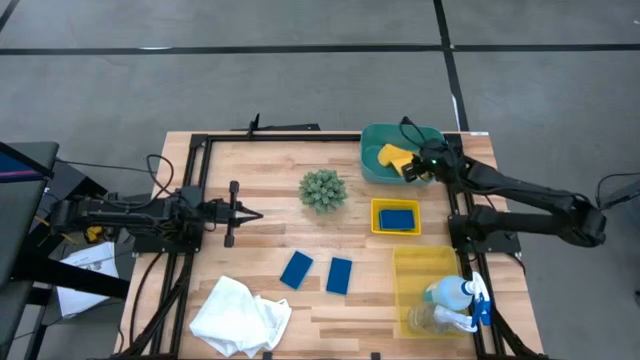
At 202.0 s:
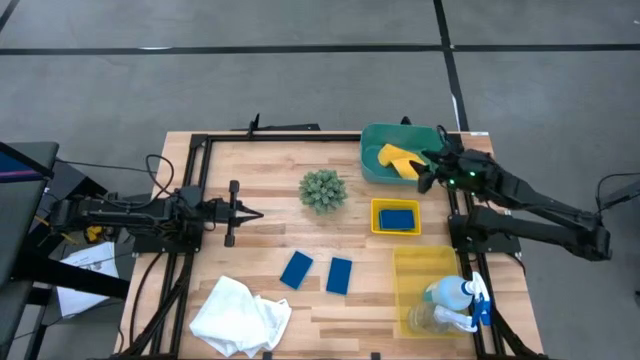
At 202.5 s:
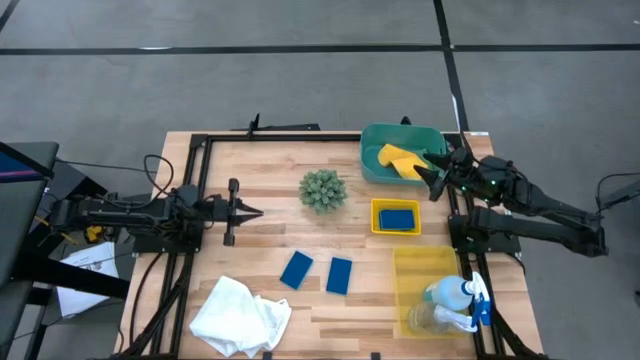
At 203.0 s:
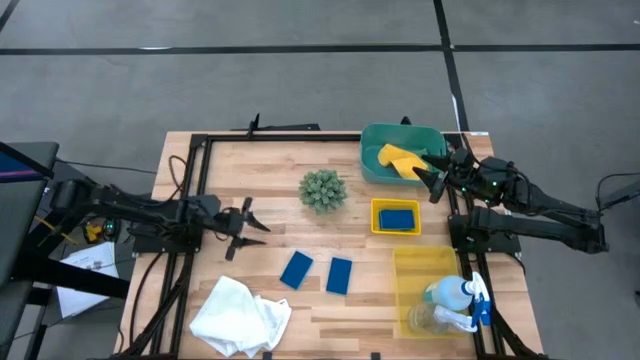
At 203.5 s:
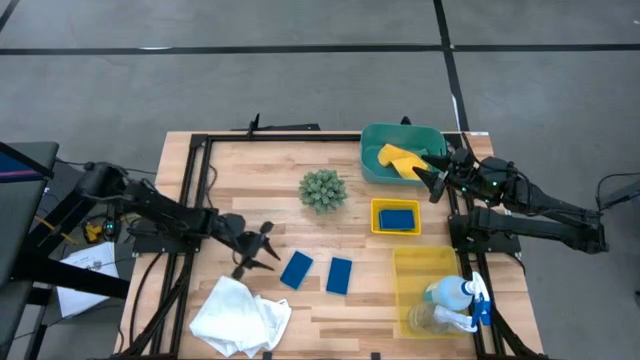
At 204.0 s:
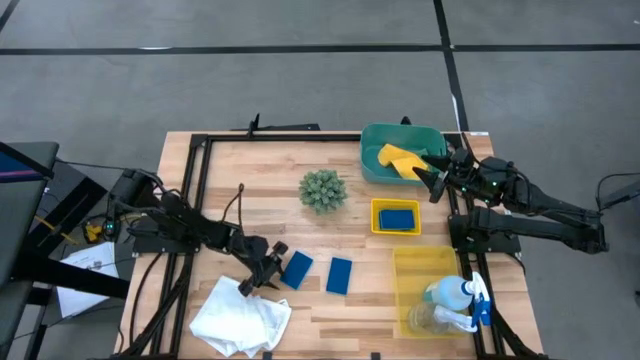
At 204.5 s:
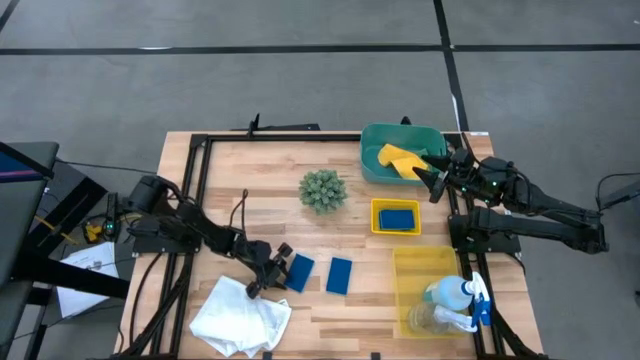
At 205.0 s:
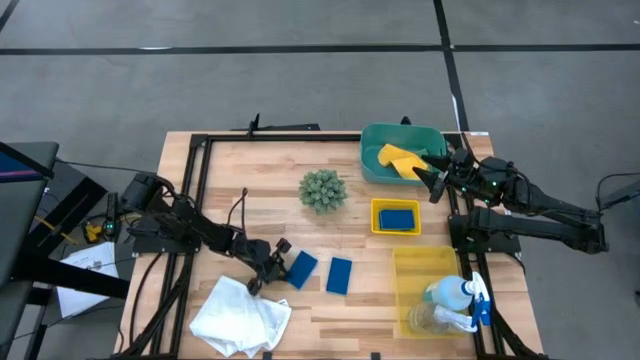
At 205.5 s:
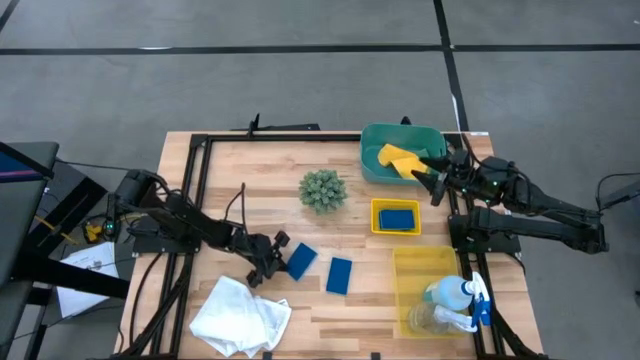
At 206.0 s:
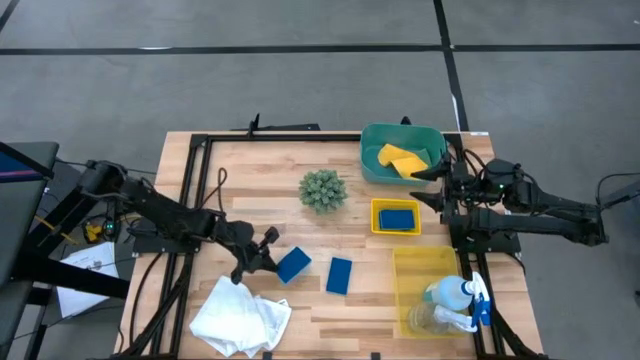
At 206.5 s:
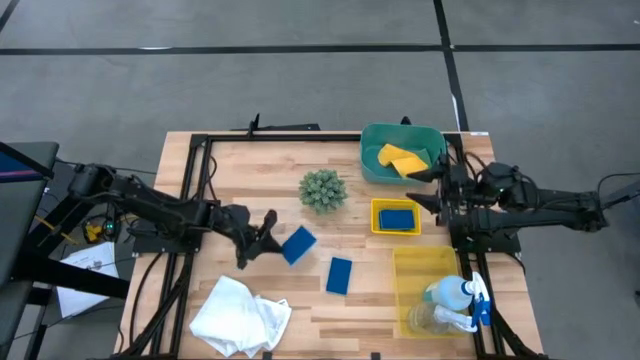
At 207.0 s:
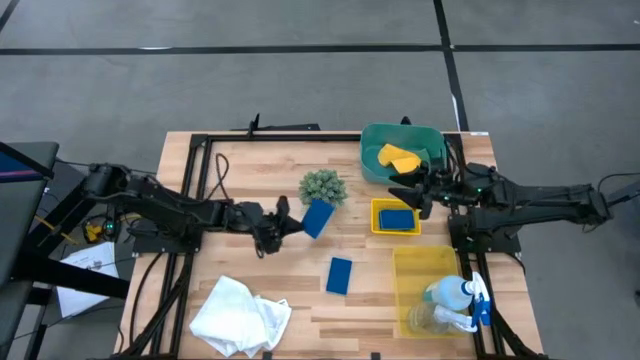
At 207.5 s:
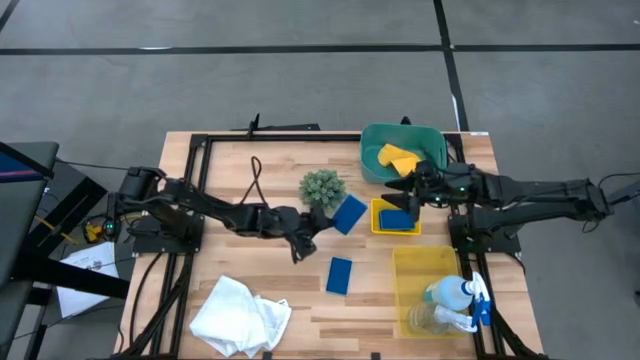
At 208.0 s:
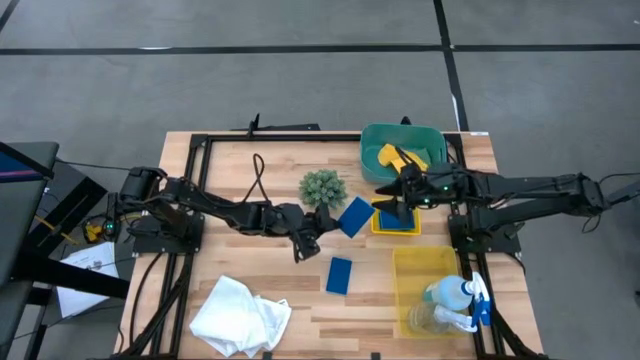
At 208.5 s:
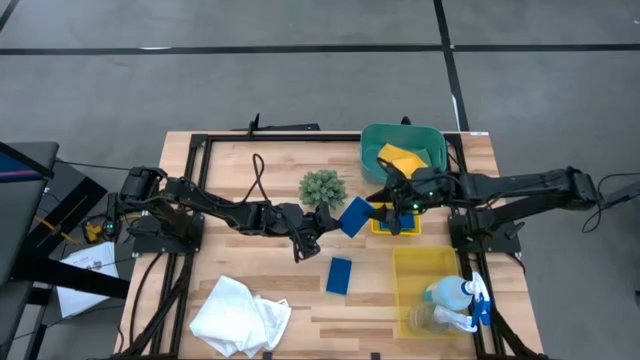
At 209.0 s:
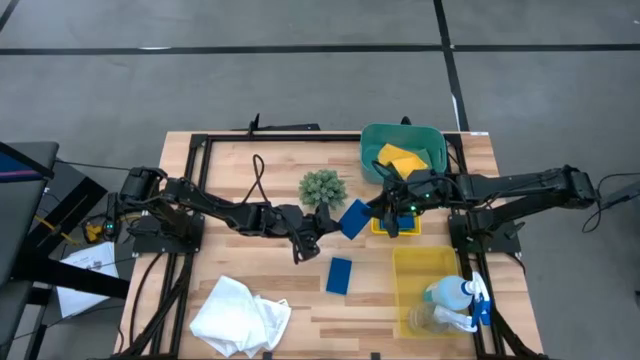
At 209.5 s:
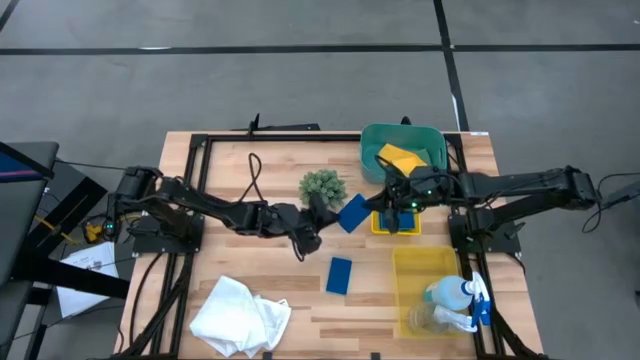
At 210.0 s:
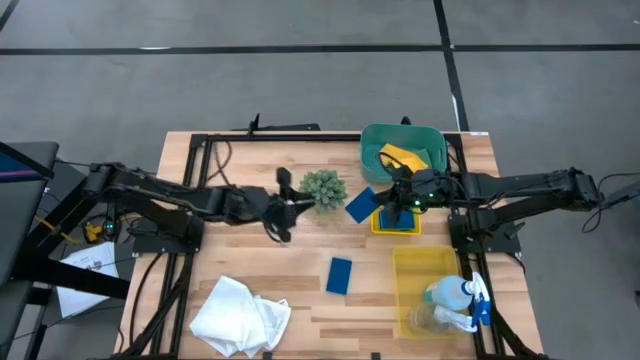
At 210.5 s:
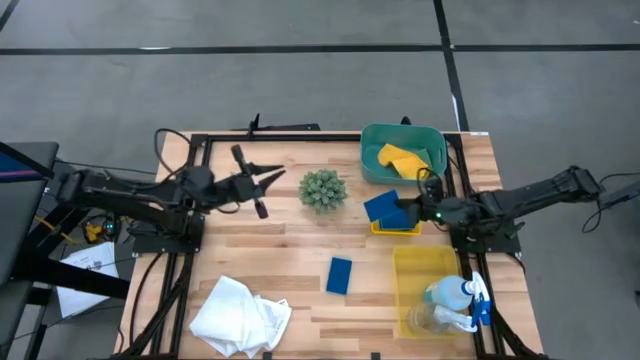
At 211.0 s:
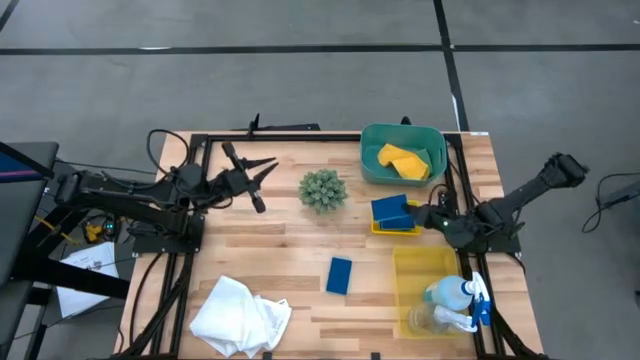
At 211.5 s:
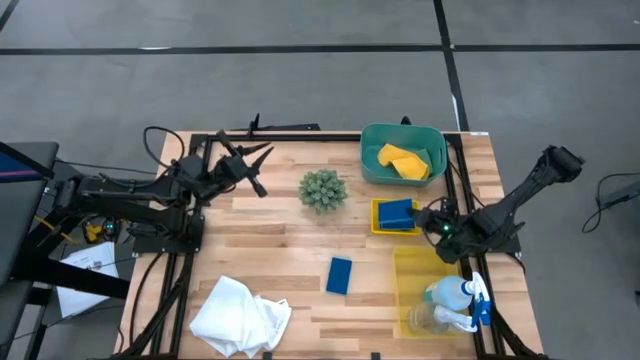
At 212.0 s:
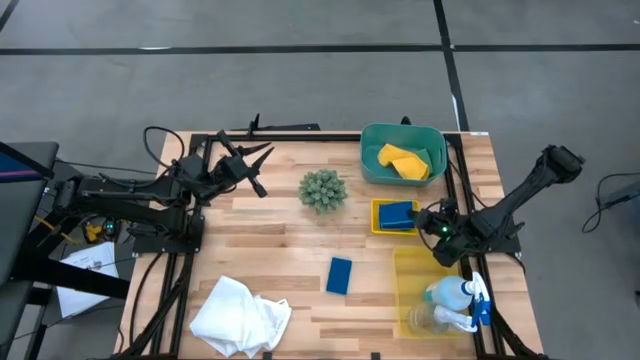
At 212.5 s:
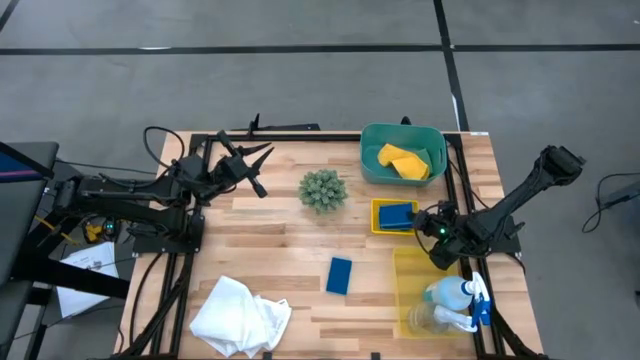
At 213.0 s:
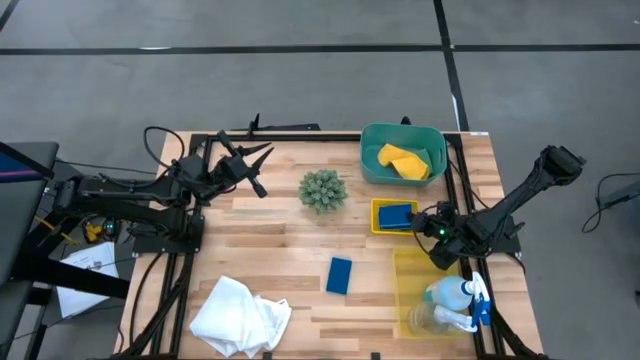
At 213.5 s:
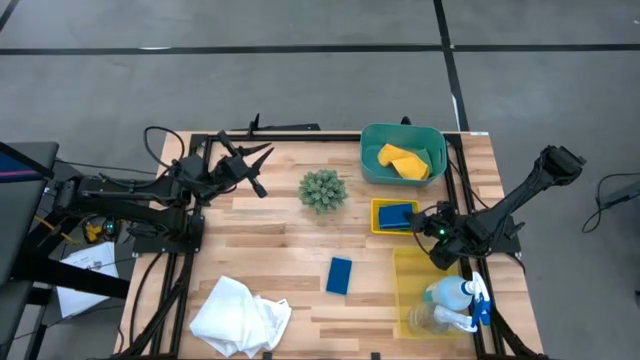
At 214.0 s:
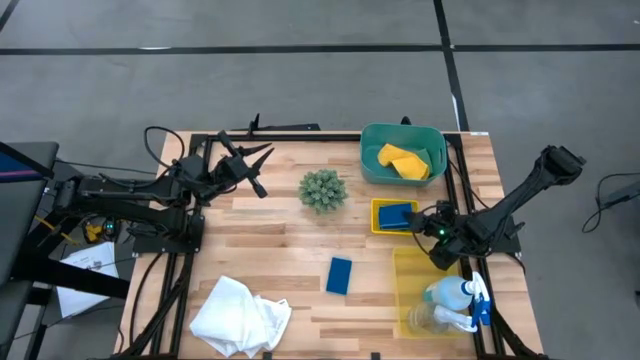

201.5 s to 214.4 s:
Task: Pick & Place Kitchen Items
Put the blue sponge into the top yellow bin

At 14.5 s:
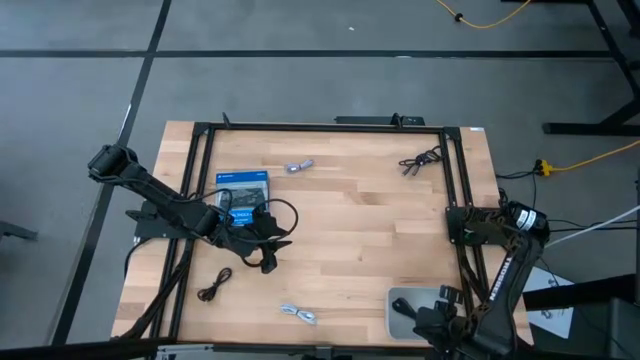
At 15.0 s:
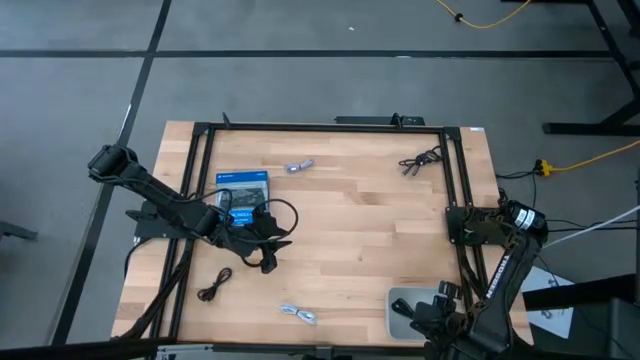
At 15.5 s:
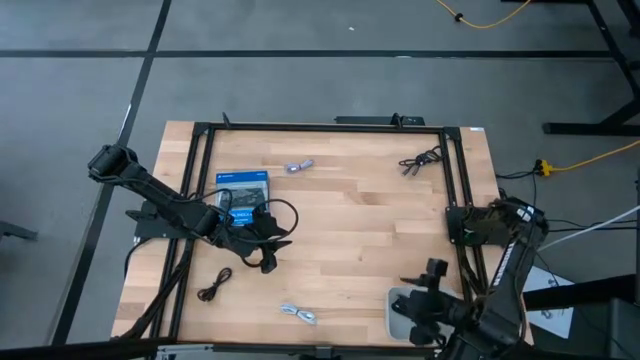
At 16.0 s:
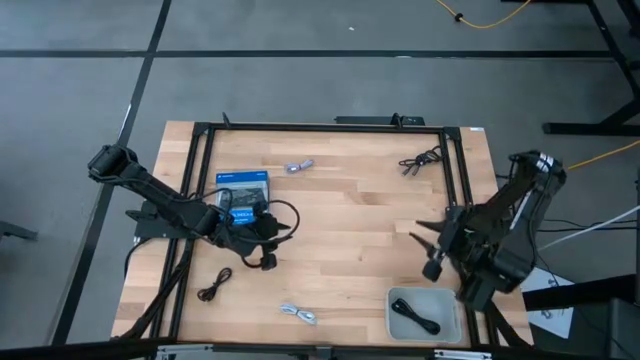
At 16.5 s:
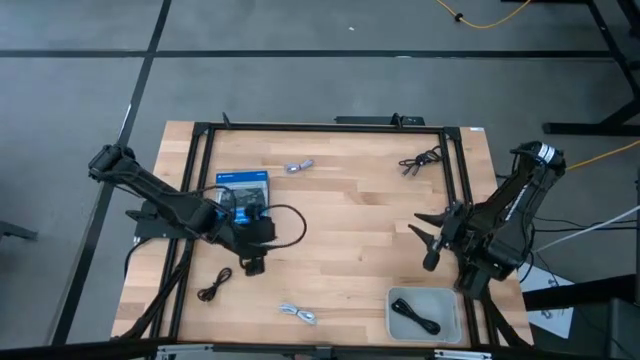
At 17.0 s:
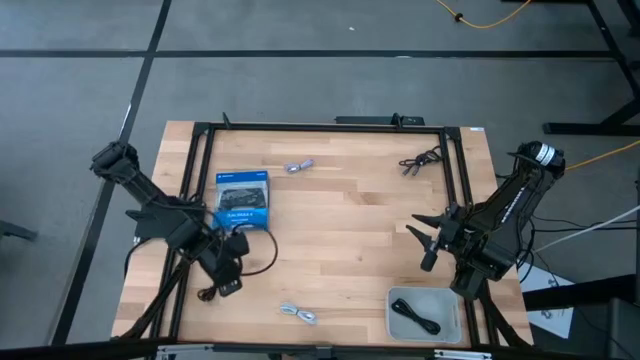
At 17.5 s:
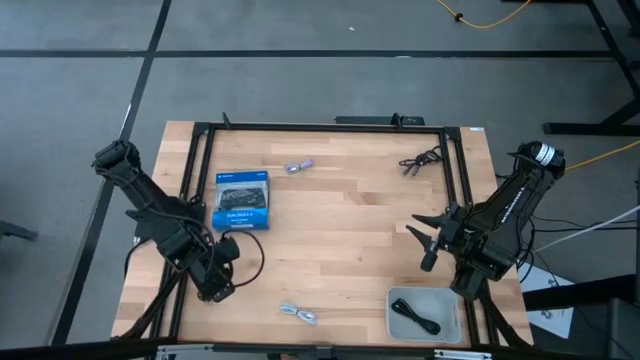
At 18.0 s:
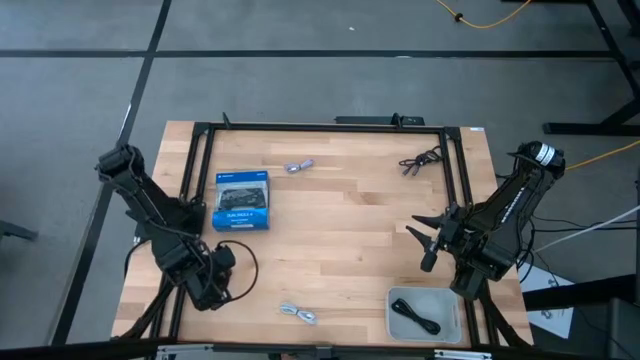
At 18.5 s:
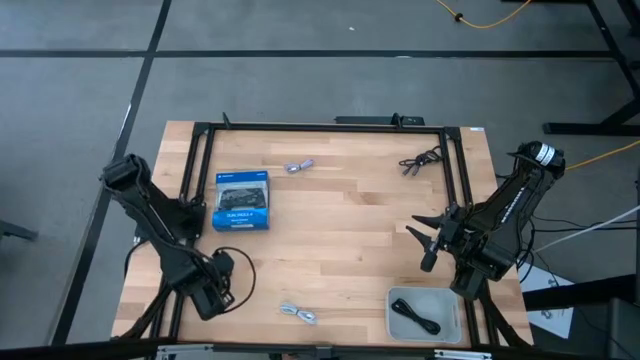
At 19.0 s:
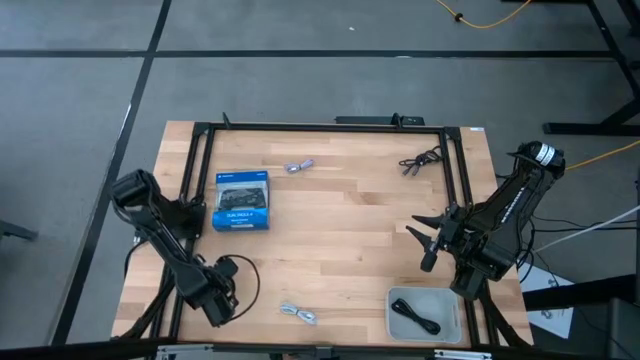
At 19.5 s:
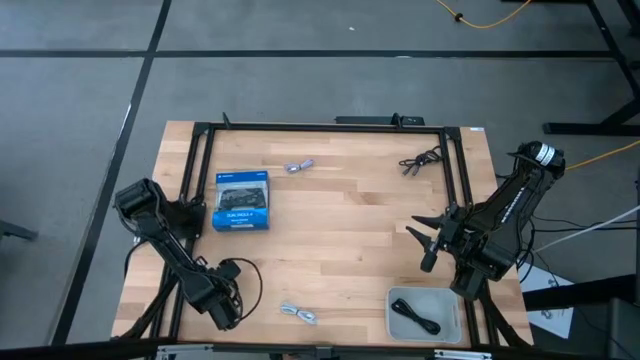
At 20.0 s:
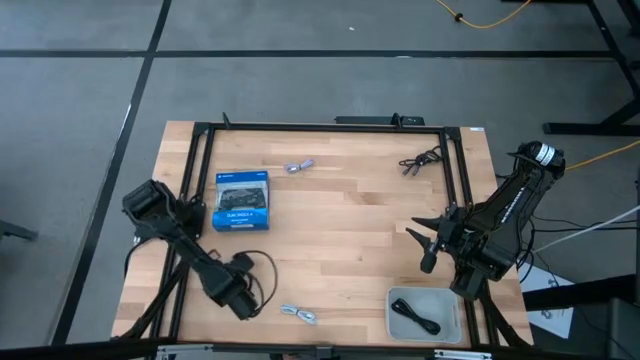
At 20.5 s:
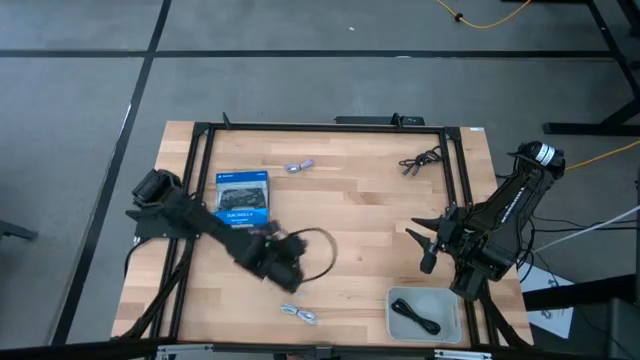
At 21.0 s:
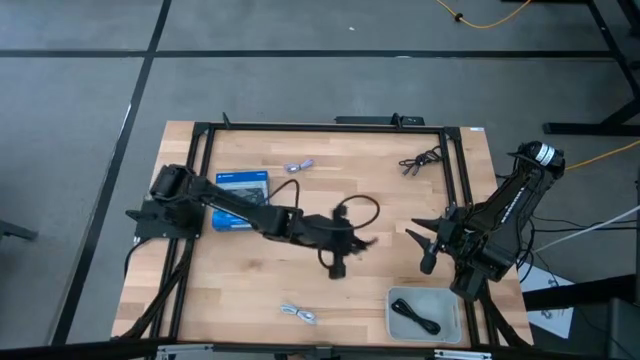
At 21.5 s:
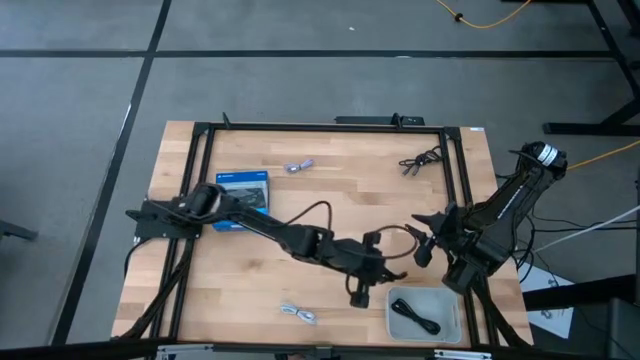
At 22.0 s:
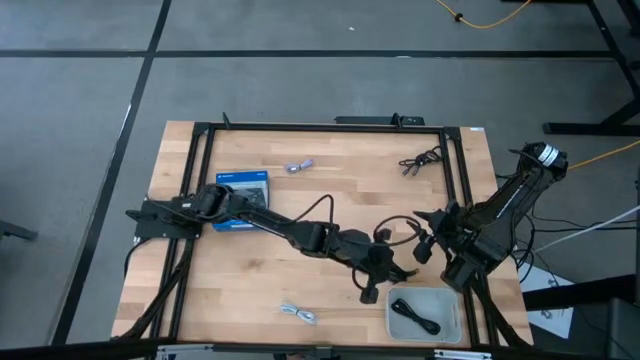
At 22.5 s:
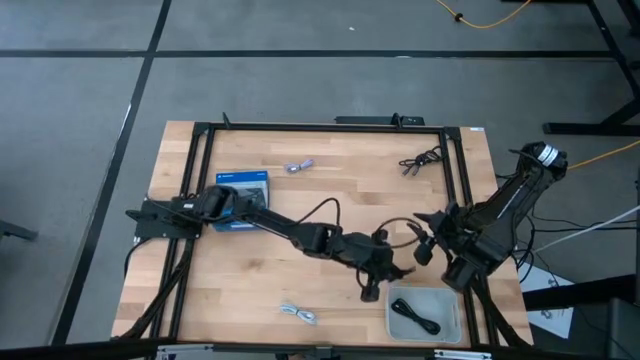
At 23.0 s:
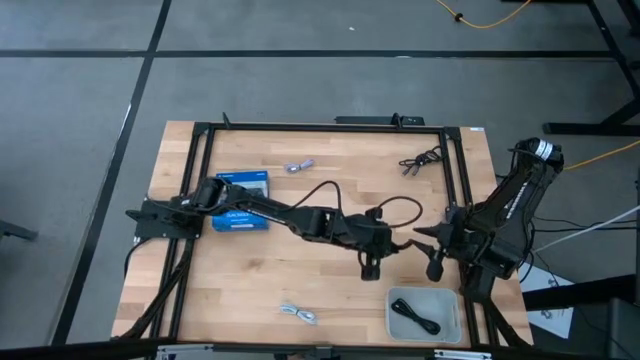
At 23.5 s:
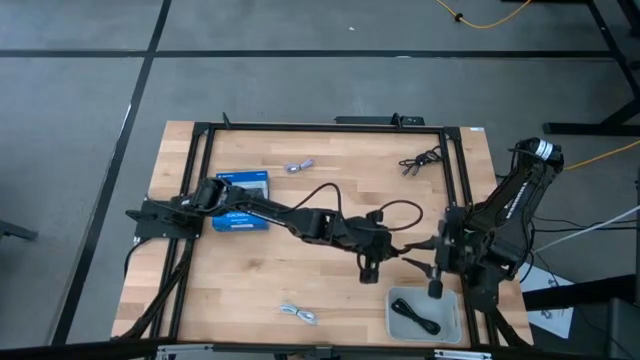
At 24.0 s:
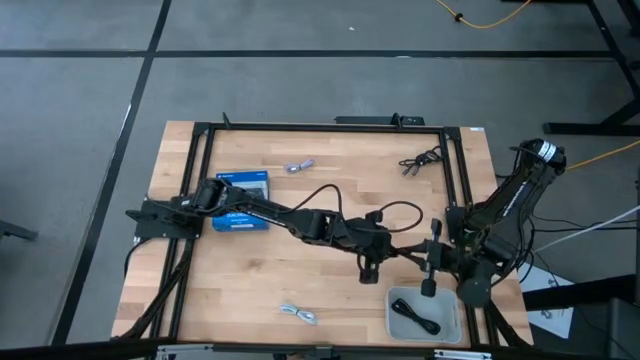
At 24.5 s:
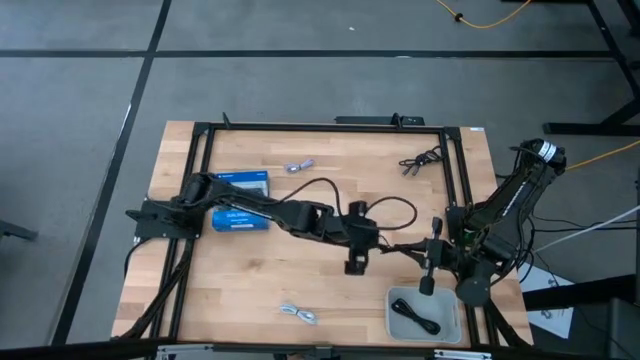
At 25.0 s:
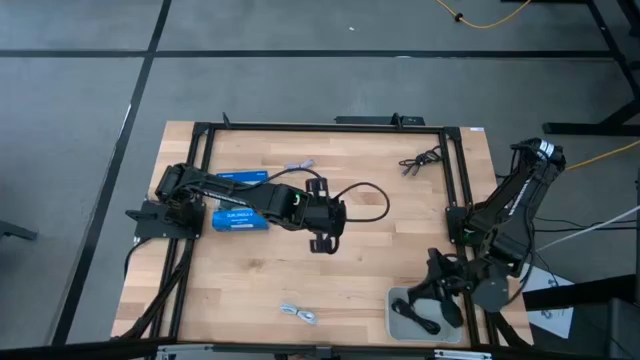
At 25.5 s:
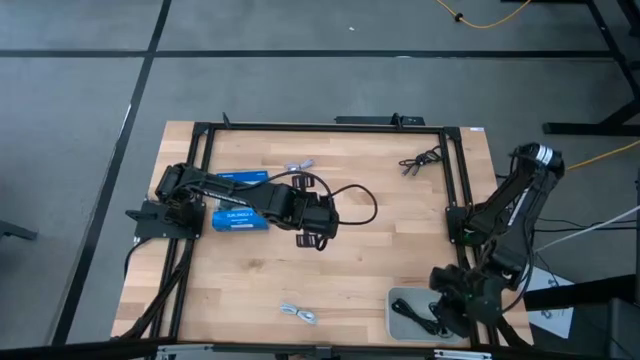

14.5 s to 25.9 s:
Task: Pick and place USB-C Cables
Put the bottom black charger cable into the white bin
